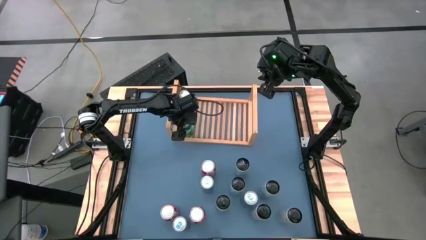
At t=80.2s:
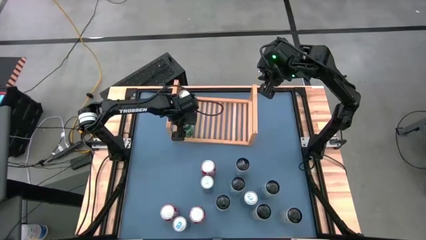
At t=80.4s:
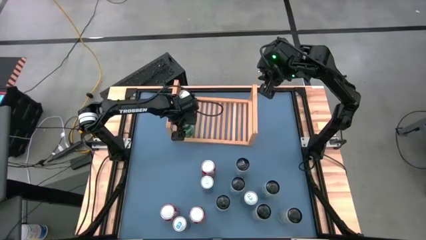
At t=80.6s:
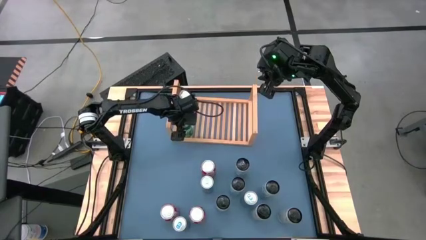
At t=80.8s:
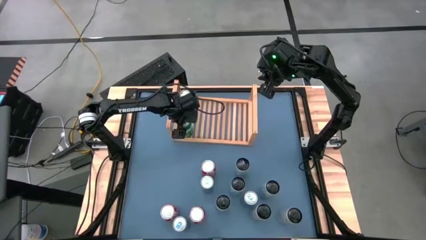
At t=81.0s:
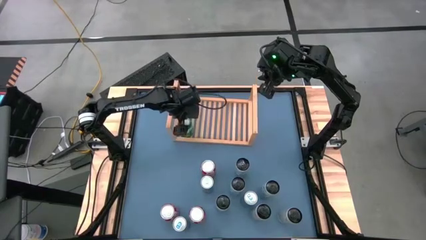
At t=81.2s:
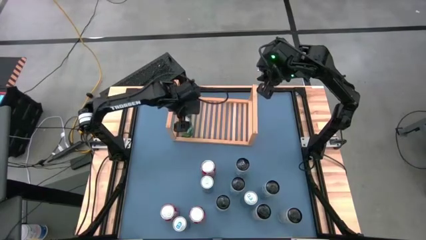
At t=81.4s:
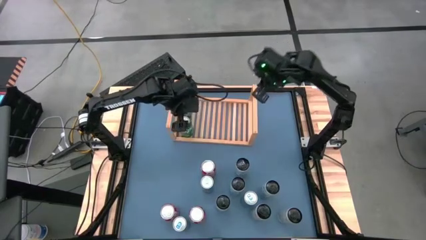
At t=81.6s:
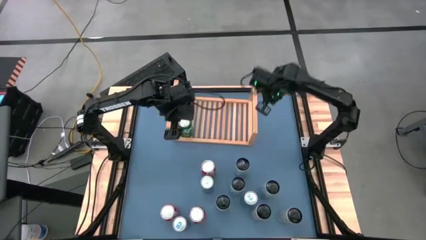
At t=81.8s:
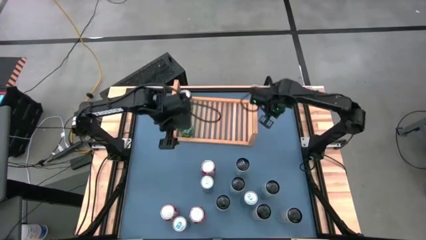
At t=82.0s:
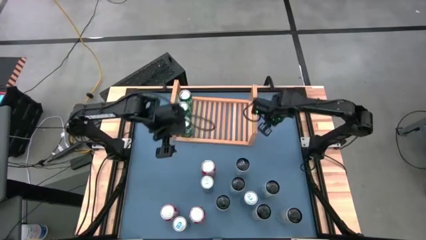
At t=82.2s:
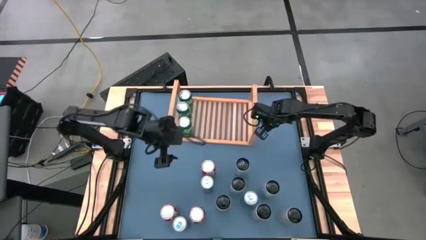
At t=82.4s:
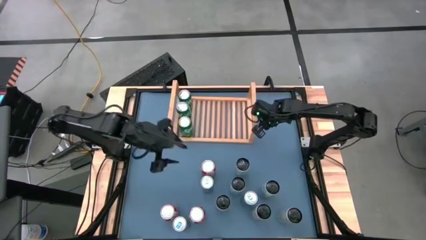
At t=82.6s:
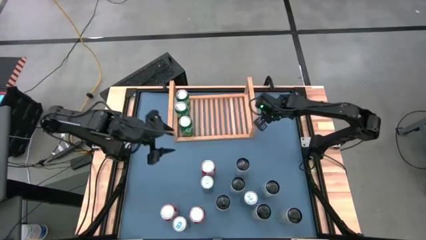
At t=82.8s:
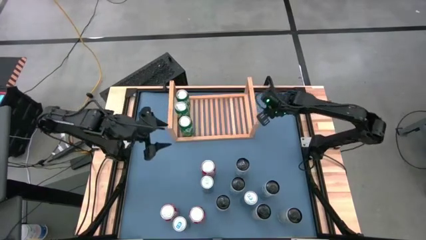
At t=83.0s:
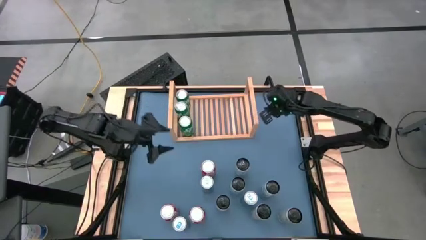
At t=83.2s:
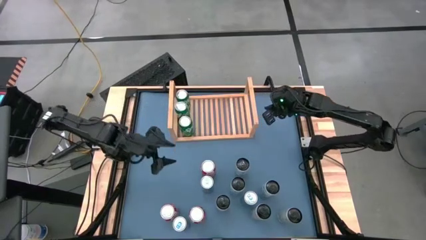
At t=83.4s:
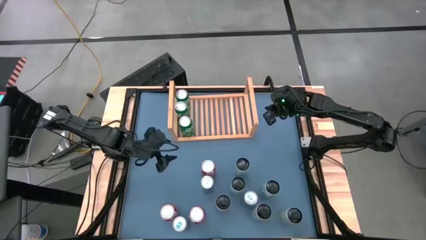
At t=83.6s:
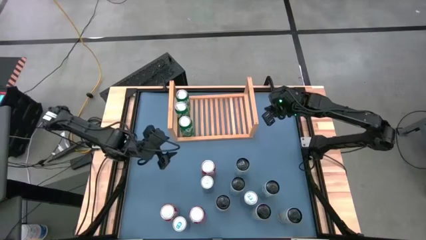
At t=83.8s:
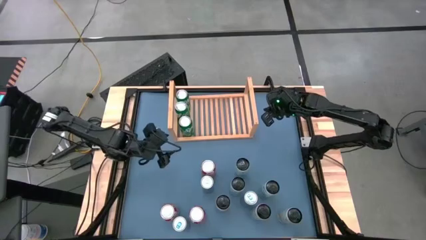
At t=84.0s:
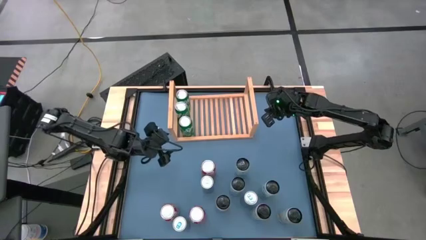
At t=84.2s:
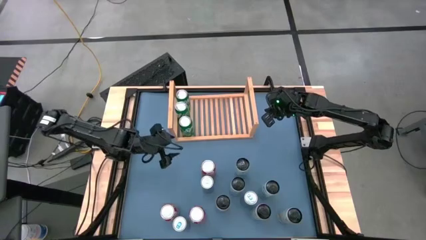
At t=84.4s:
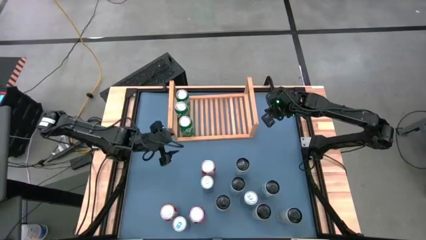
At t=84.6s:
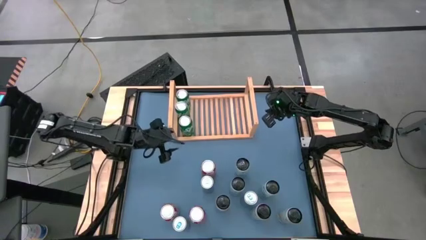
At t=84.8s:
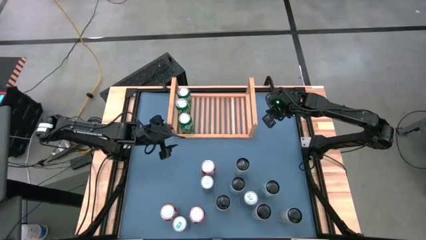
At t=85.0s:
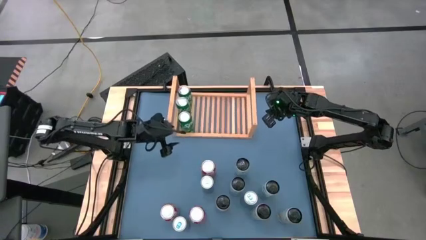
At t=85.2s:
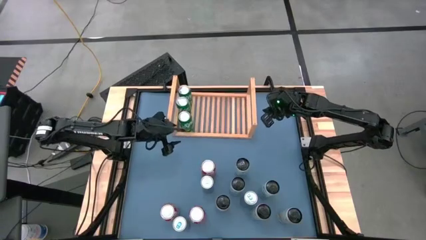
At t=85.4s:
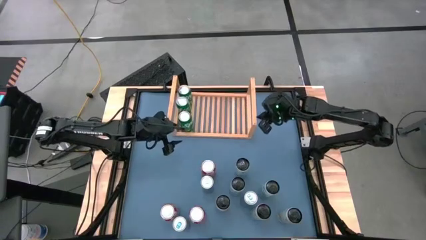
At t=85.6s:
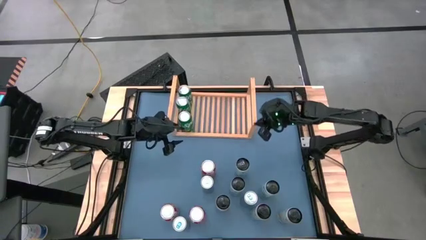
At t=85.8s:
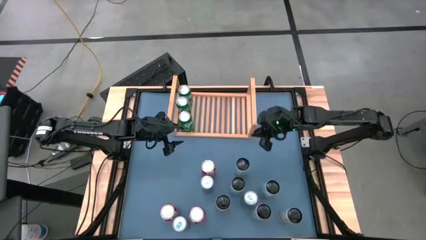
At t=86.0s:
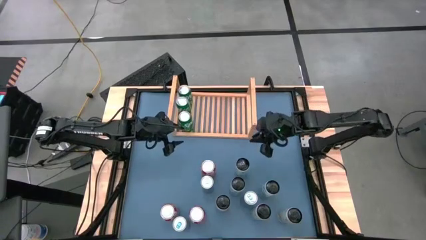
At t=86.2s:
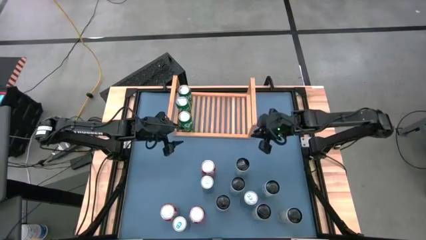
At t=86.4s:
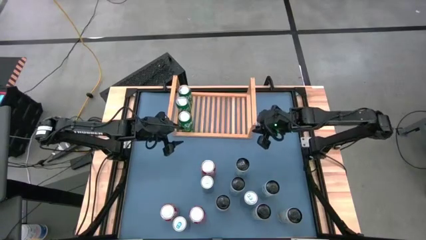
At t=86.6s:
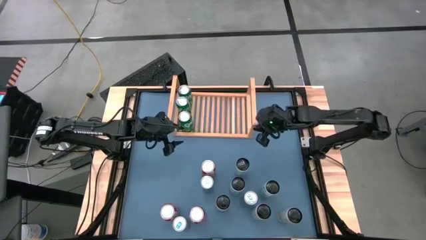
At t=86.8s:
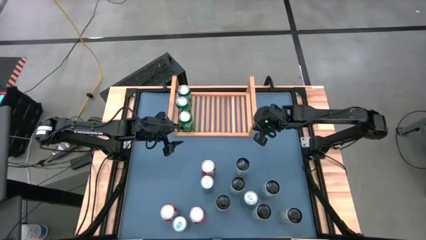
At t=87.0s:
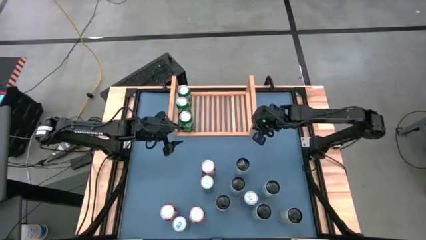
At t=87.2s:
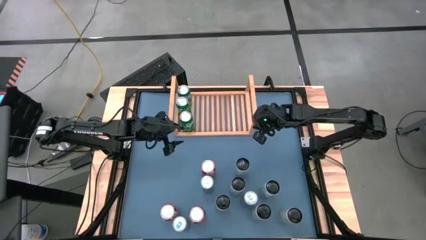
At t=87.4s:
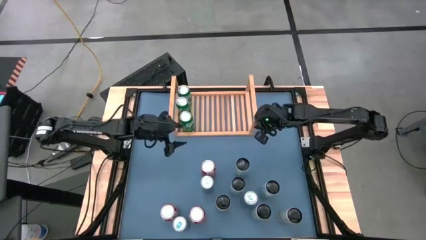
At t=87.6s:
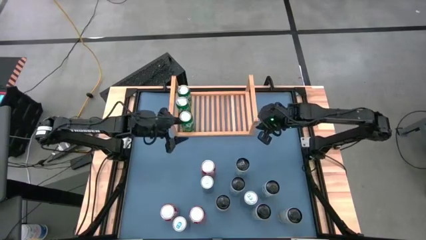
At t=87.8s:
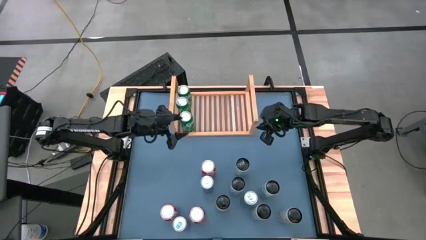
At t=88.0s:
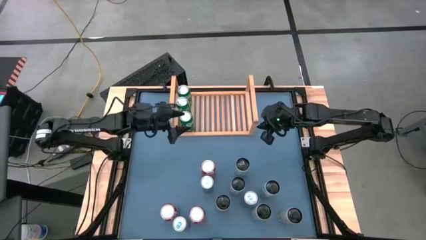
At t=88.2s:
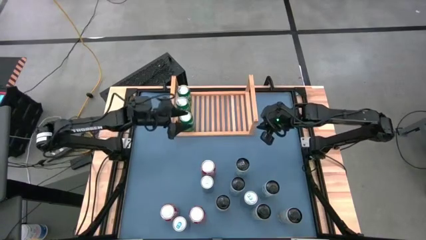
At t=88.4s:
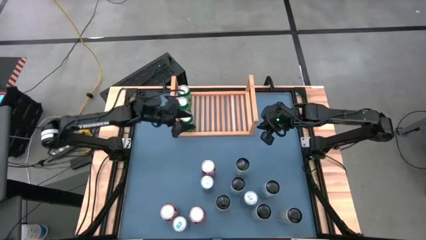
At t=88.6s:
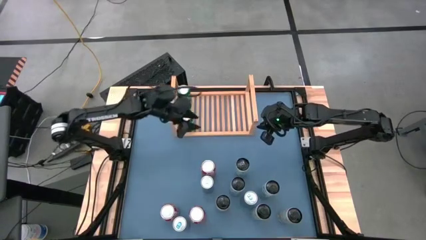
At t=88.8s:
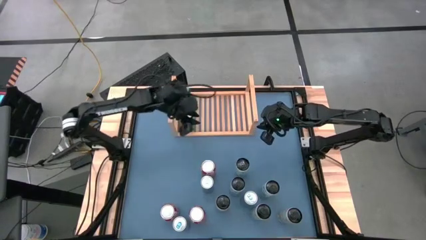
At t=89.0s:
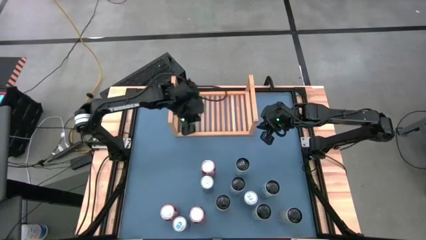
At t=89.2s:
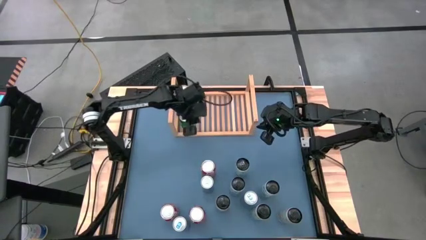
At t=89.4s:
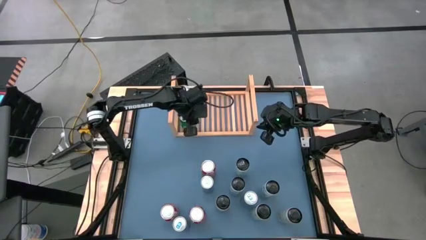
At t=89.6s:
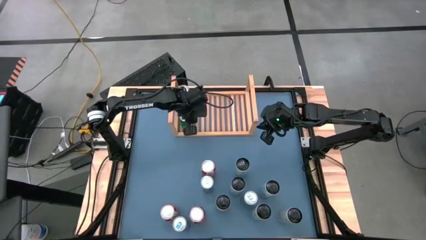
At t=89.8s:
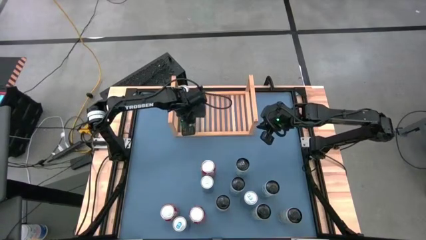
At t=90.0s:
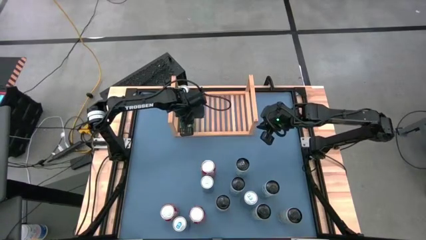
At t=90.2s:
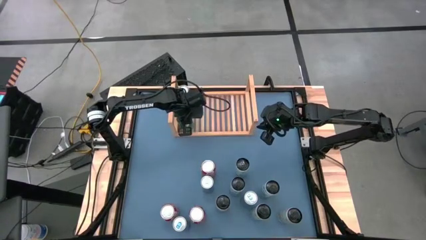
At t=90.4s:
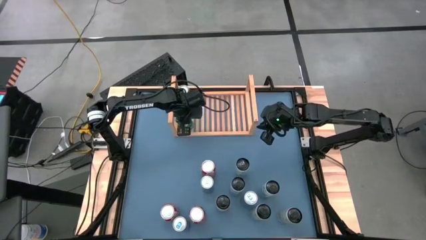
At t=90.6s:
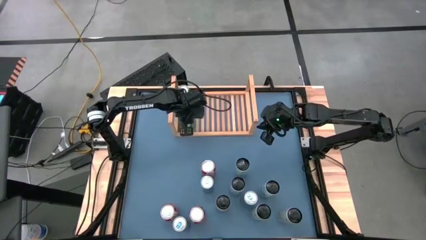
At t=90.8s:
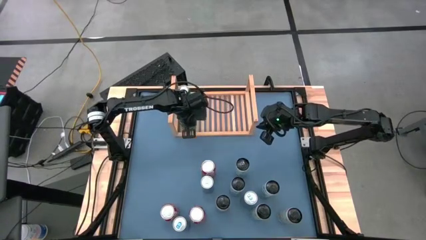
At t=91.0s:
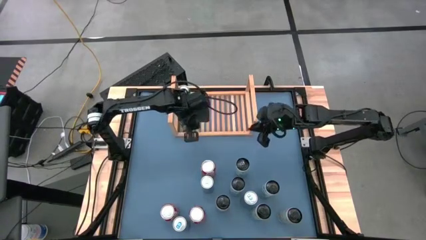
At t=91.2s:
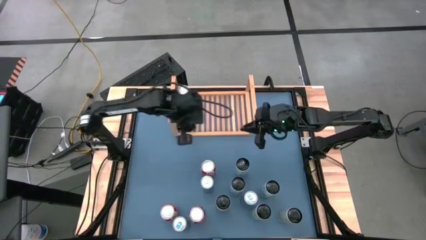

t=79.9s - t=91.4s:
Task: Place canned beverage on shelf
Adjust the shelf

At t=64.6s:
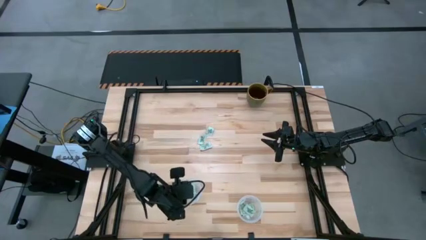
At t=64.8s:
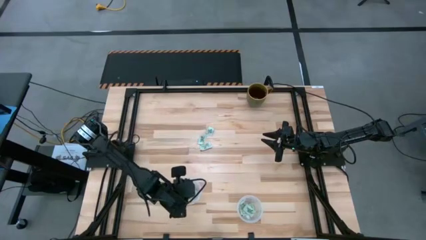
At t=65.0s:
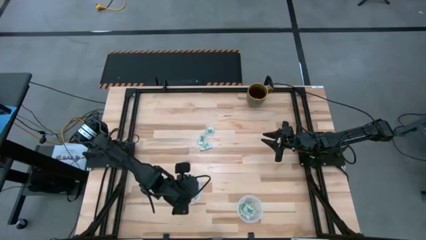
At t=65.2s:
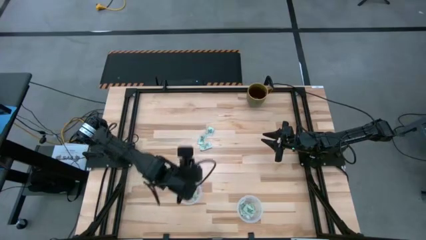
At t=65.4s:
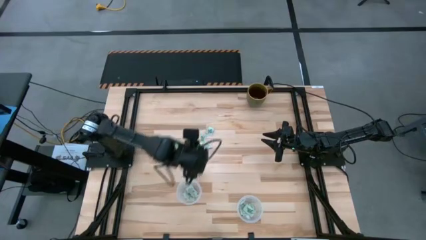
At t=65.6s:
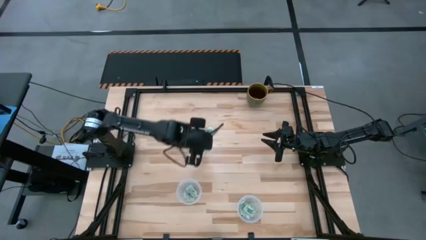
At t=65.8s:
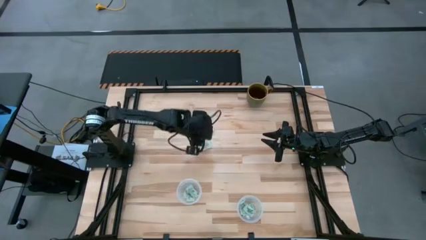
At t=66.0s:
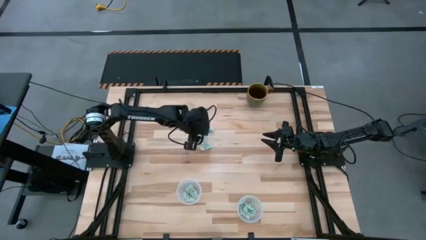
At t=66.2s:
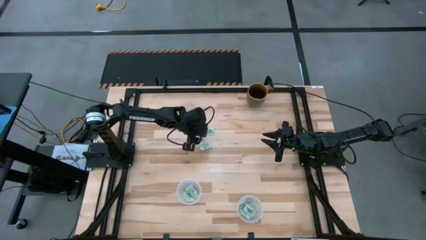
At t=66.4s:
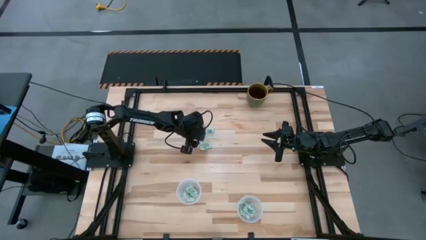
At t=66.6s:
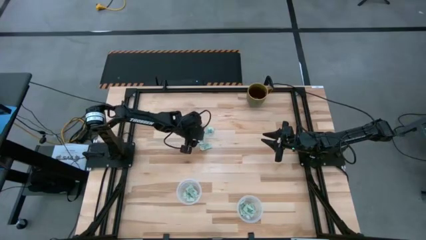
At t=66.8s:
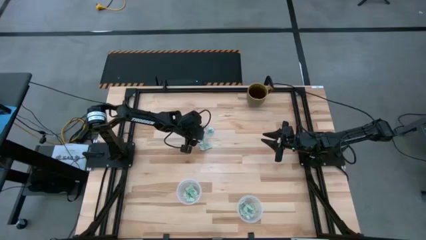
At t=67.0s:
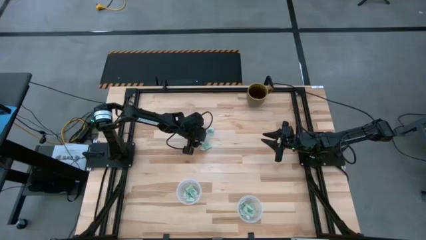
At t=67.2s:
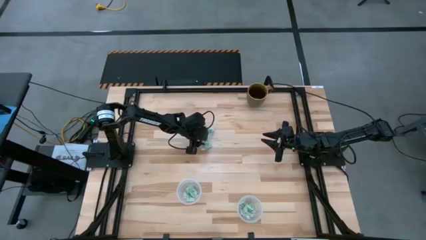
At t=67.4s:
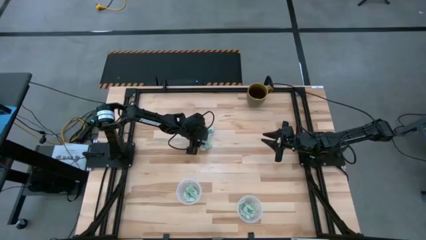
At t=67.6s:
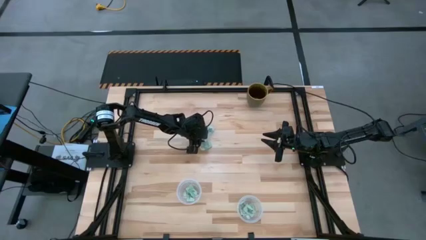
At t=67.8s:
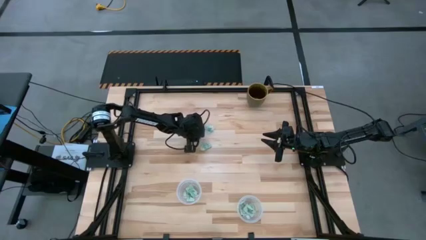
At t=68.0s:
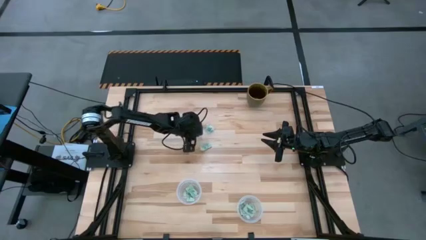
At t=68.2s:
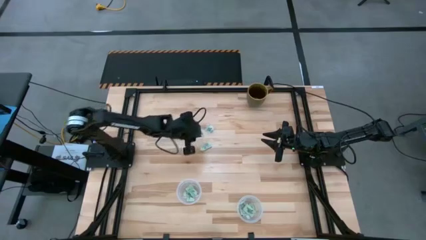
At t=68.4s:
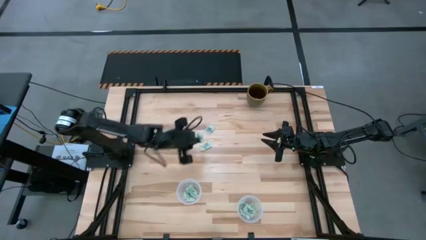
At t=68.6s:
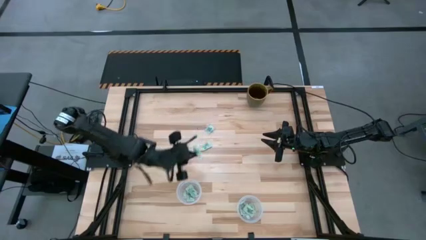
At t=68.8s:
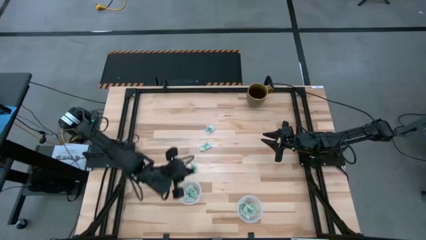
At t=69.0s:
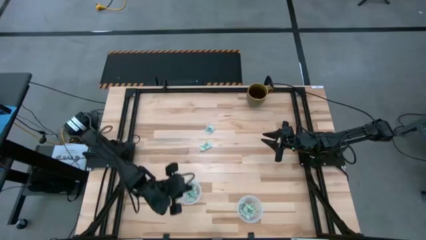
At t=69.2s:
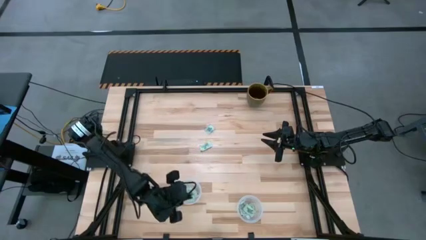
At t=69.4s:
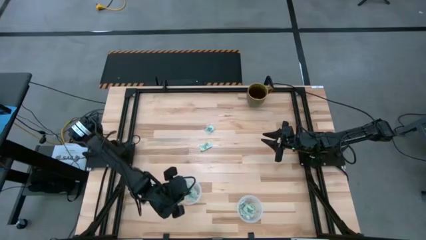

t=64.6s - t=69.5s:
Task: Pick and place items into bin
Put the stevia packet into the left transparent bin
